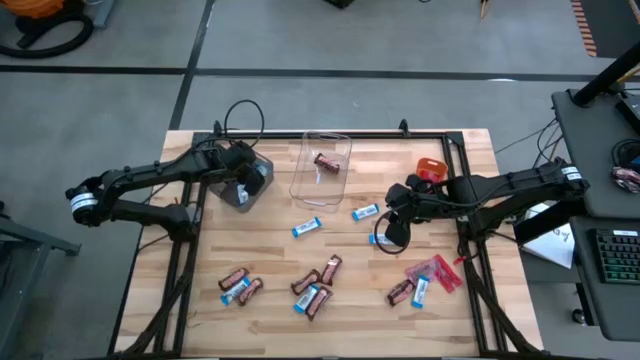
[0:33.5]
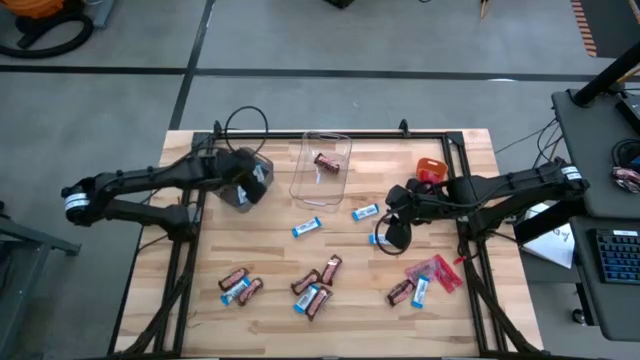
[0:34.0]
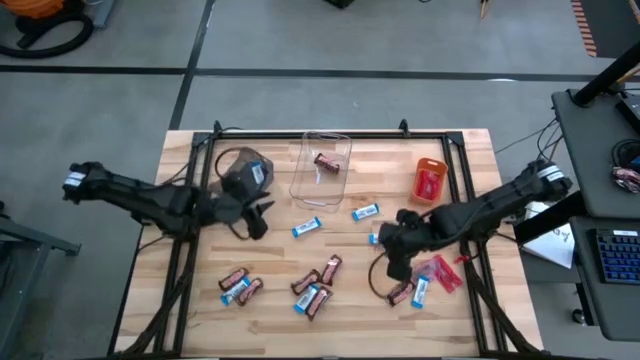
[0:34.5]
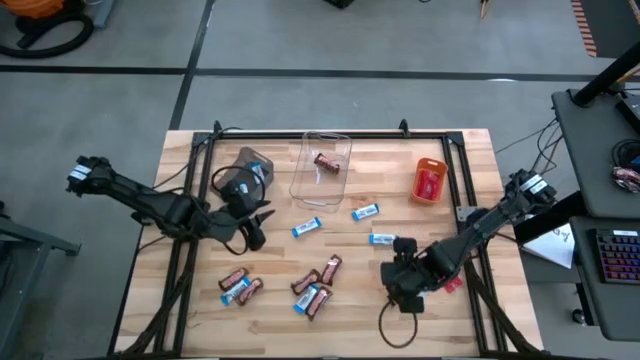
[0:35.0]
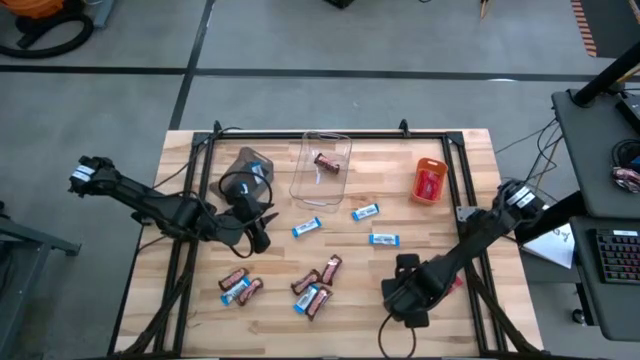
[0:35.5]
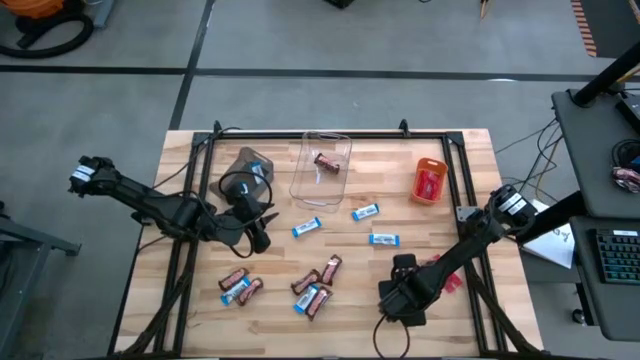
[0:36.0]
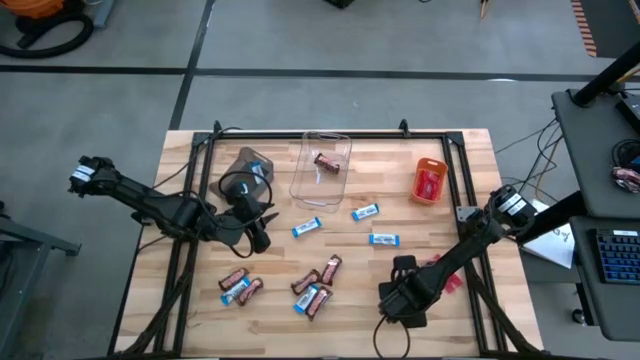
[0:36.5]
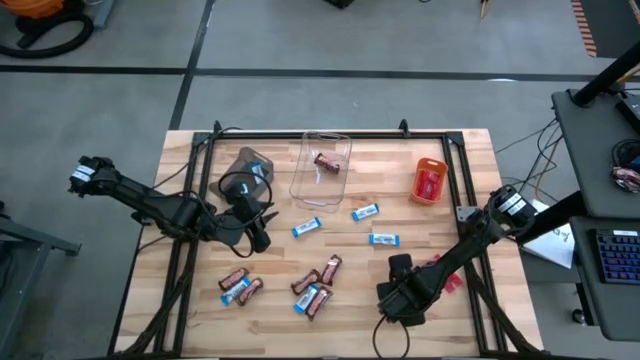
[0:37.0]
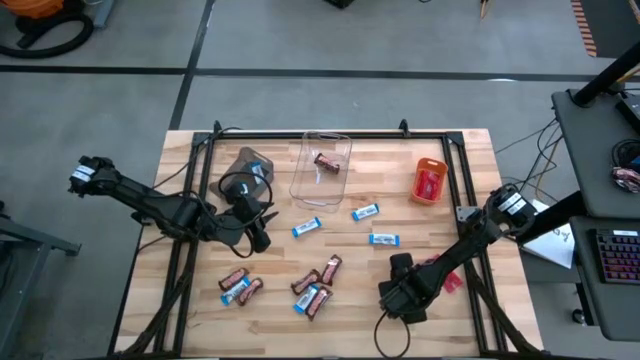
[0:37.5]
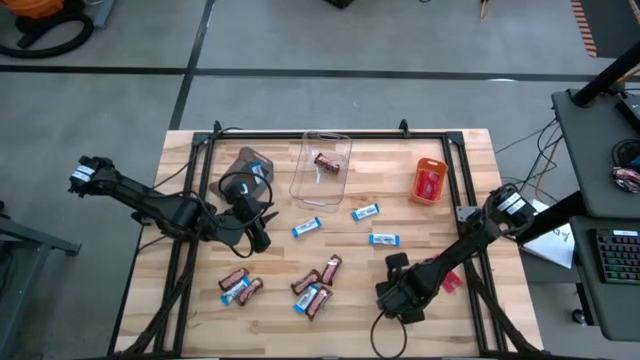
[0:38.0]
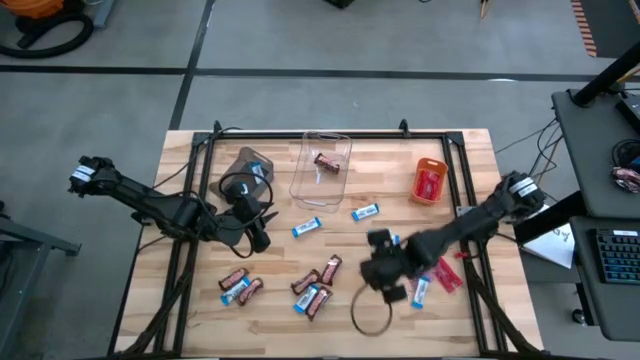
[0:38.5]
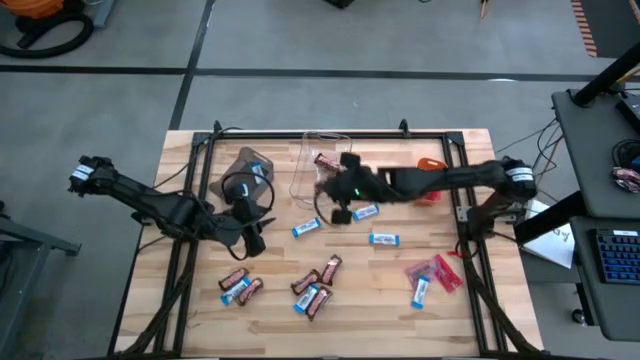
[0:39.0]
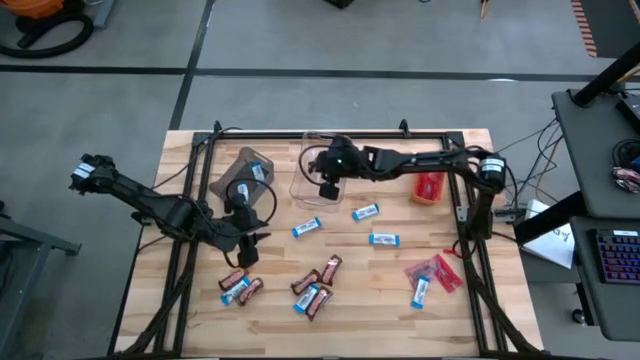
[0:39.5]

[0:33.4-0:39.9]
Task: Sort candy
Put the brown chocolate into the transparent bin

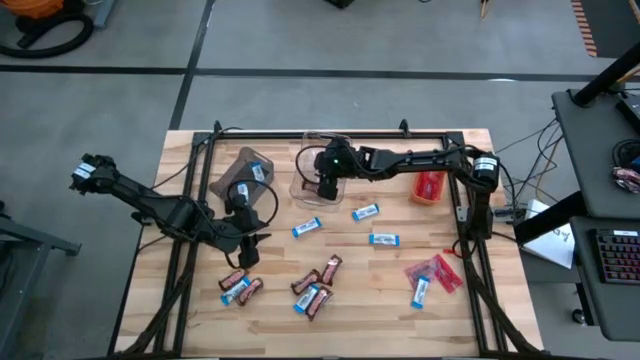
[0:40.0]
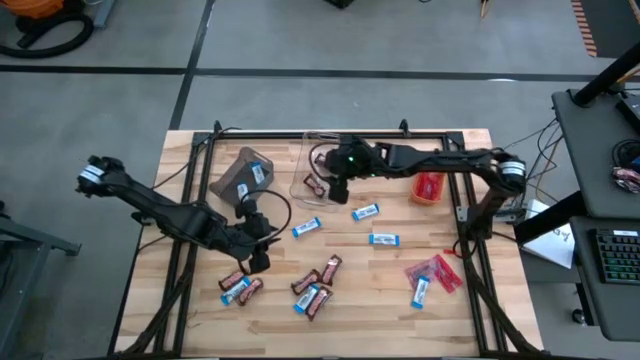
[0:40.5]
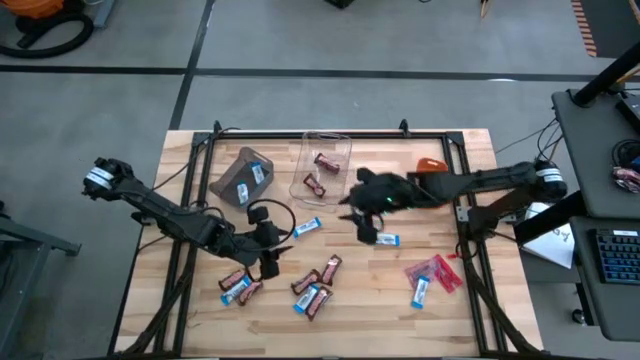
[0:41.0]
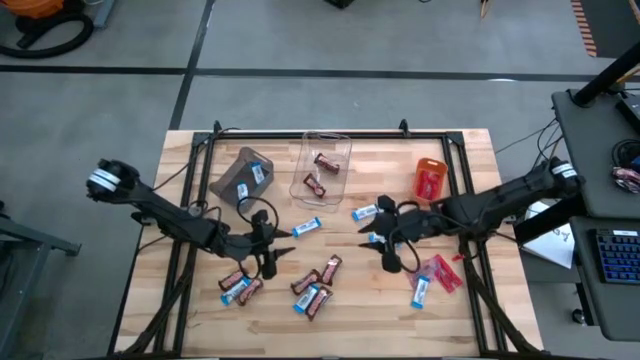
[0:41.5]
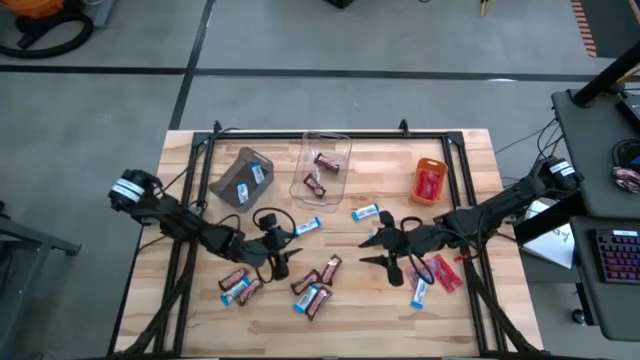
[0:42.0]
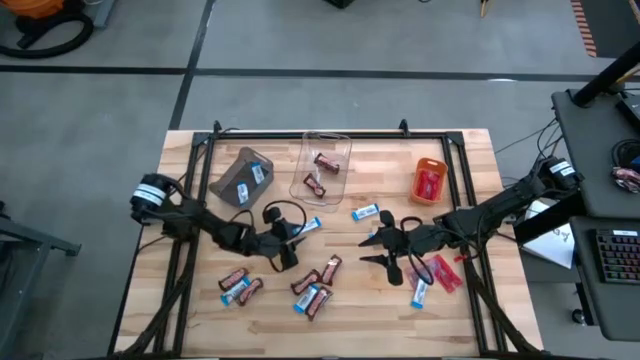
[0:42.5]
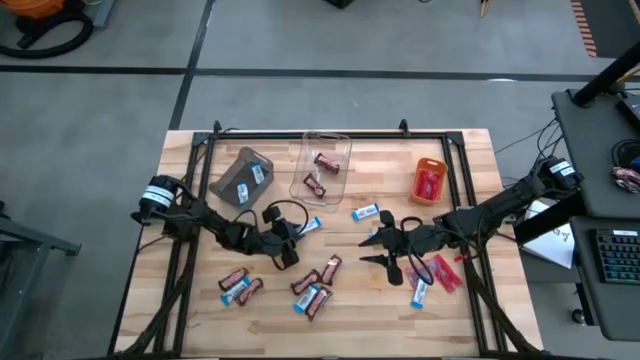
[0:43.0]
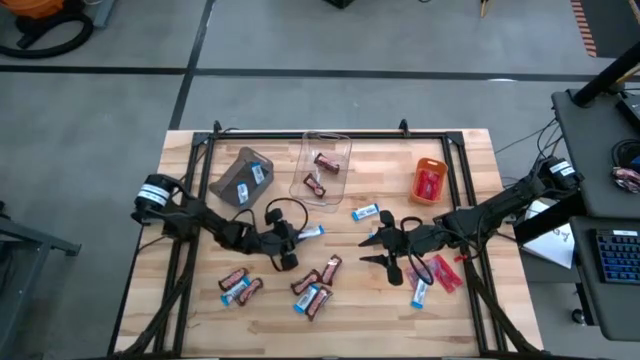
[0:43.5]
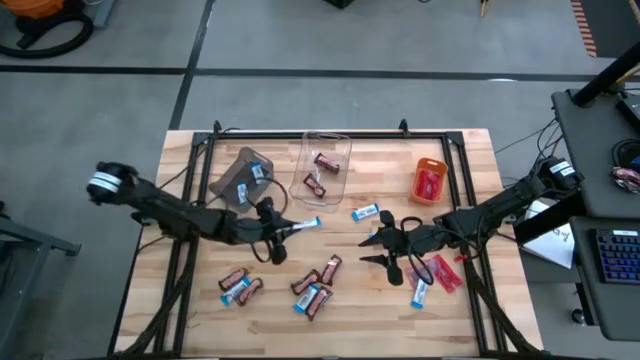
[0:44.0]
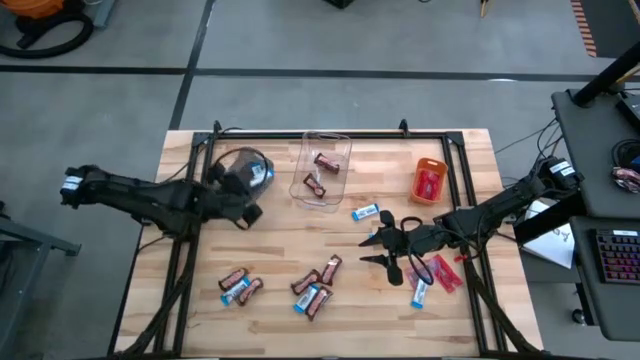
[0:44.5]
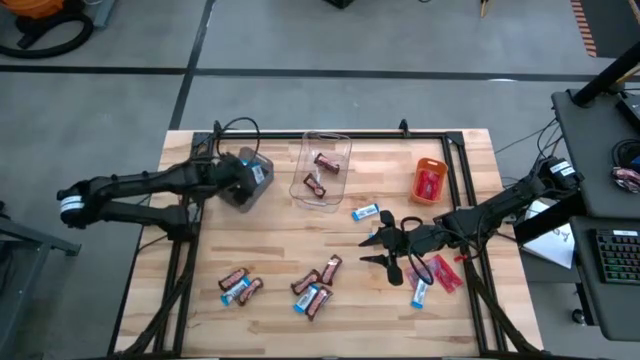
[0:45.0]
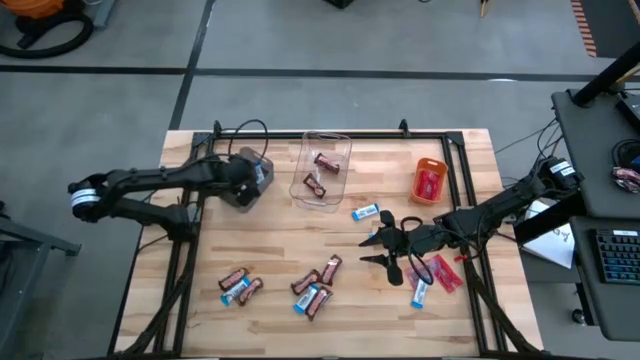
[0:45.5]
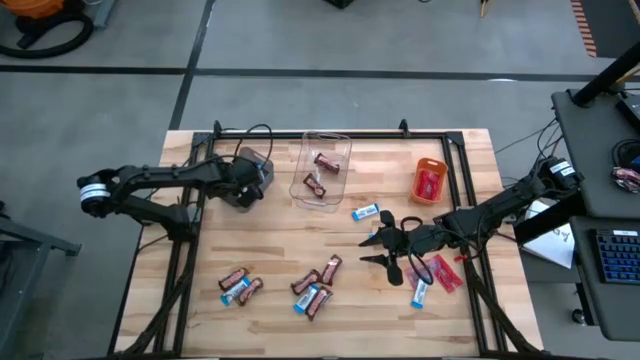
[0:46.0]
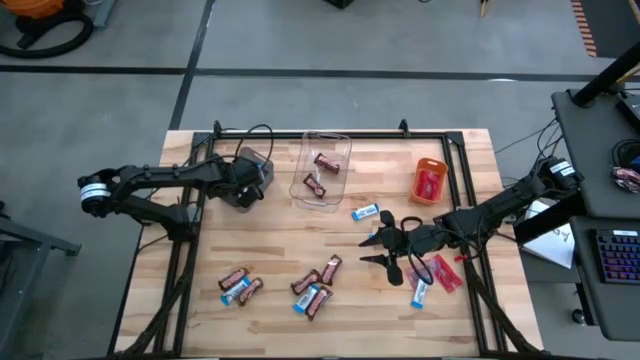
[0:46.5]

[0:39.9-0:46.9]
Put the blue chocolate into the black bin

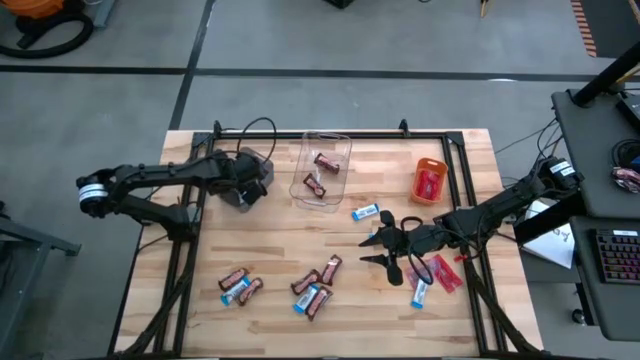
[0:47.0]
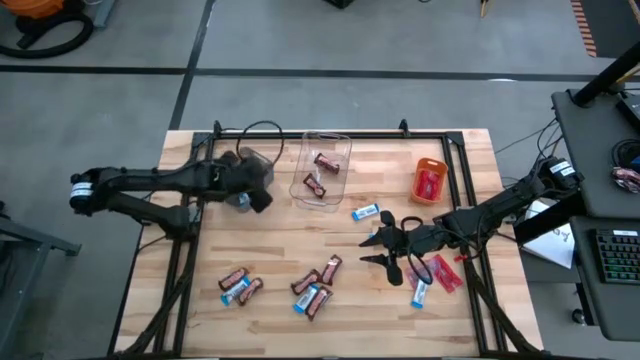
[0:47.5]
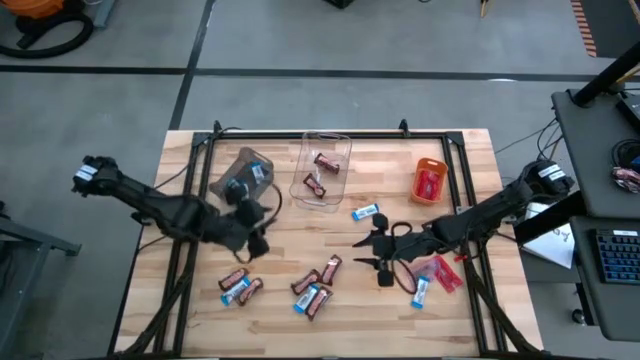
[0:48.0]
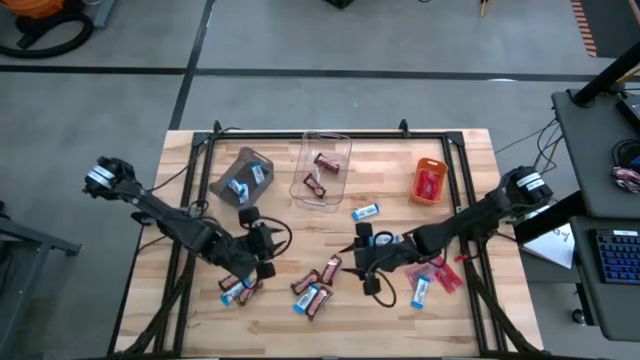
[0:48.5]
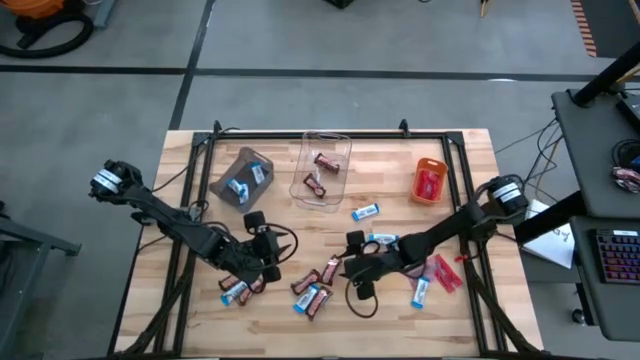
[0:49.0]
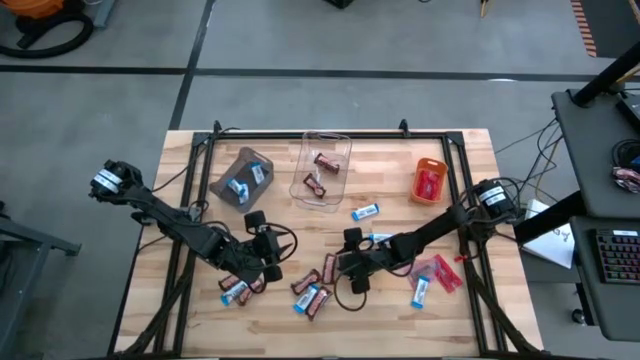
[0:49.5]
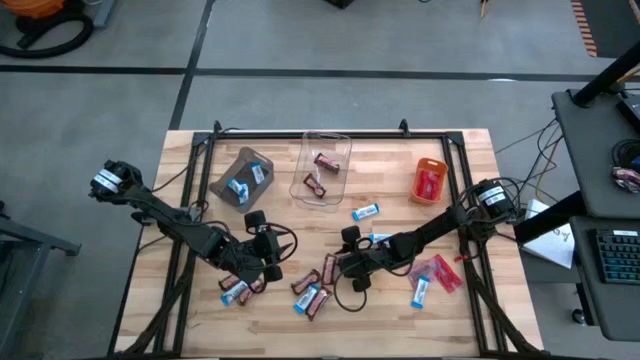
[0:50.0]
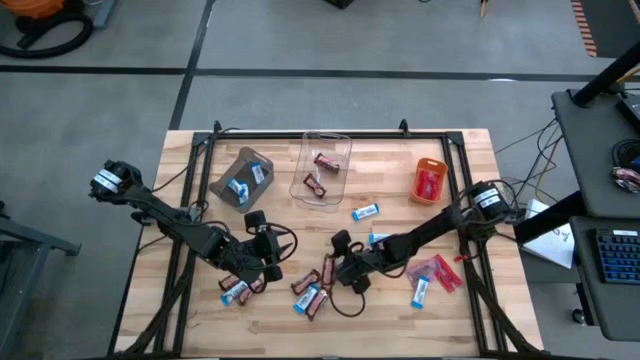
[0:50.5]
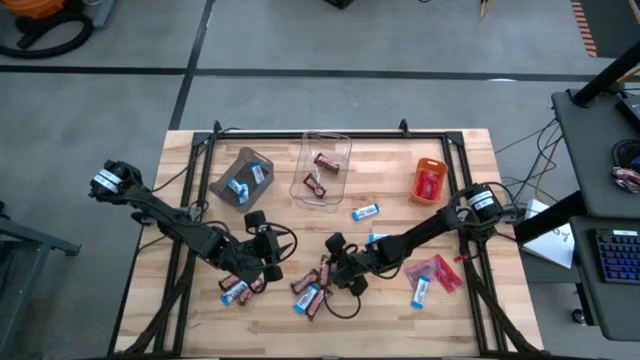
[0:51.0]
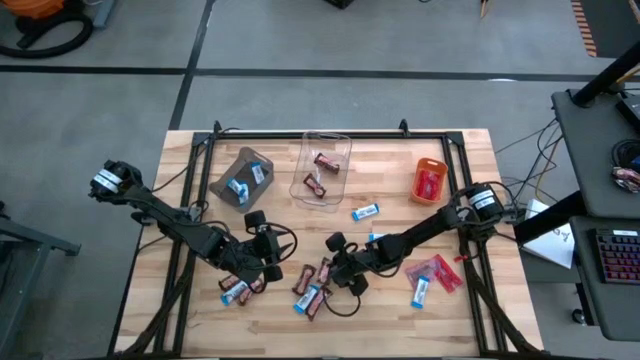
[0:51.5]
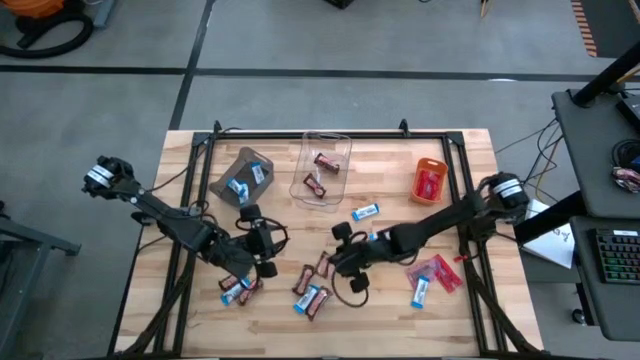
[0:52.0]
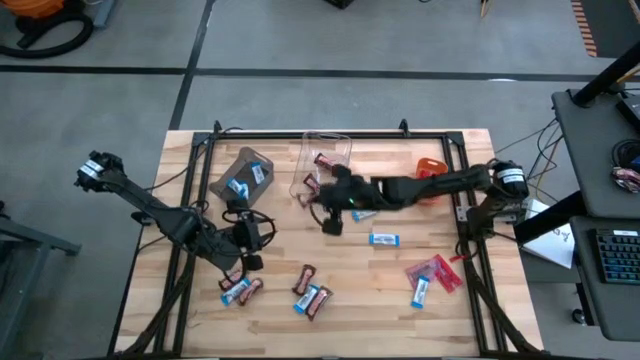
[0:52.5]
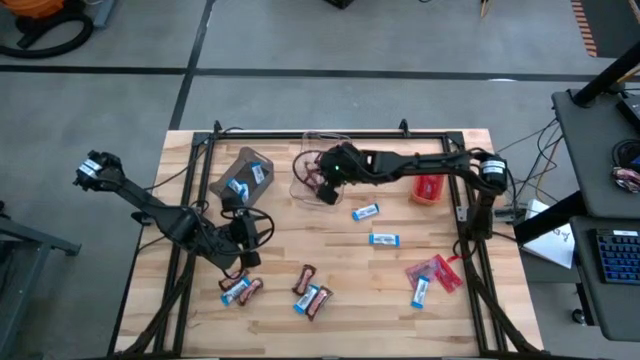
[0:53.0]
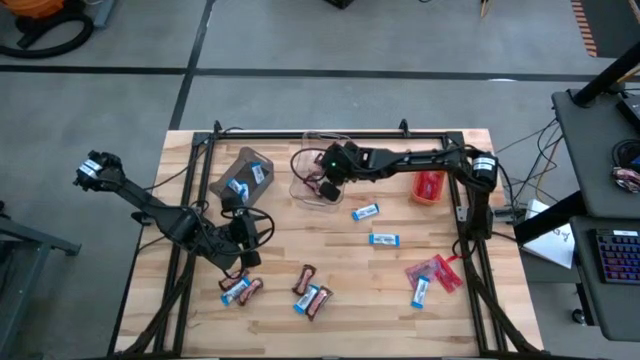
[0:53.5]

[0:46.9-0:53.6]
Put the brown chocolate into the transparent bin

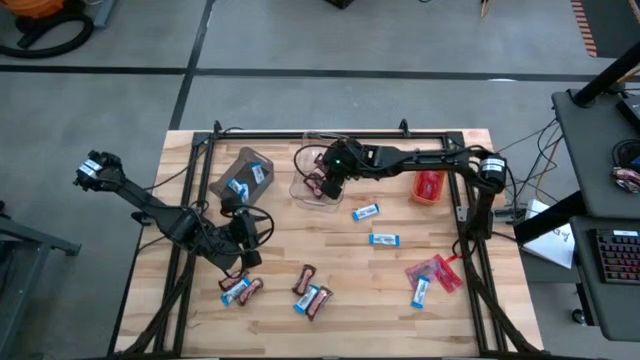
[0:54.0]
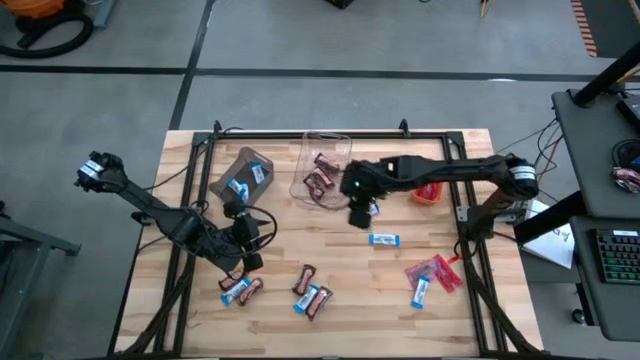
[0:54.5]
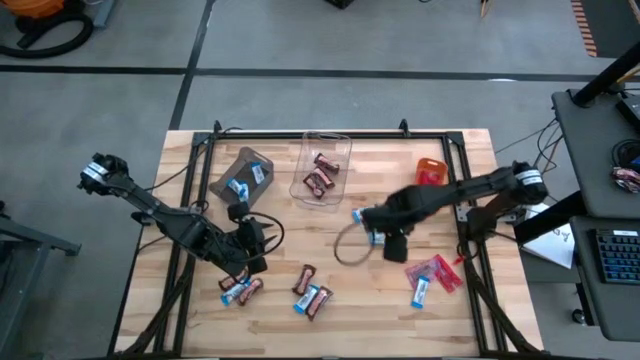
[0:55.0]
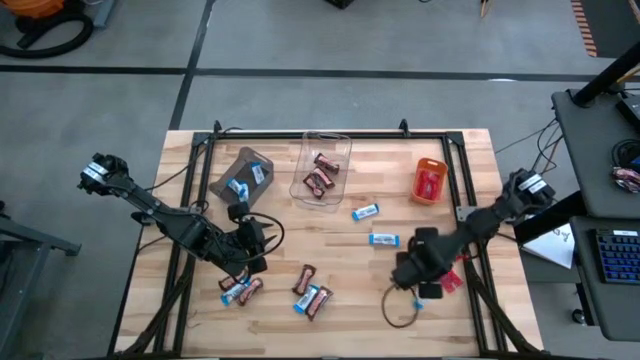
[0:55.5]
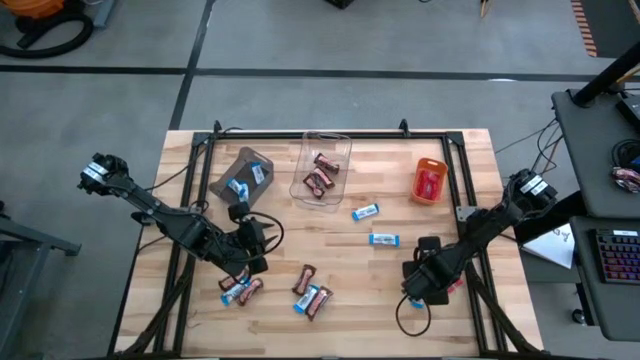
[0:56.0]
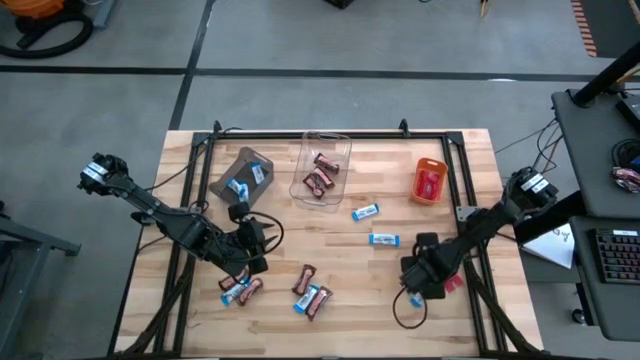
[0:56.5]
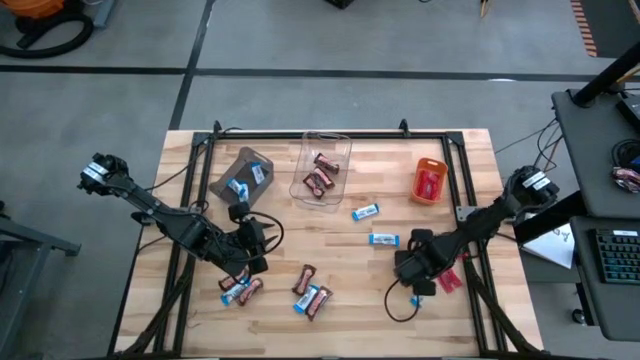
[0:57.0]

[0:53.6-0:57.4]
Put the red candy into the orange bin
